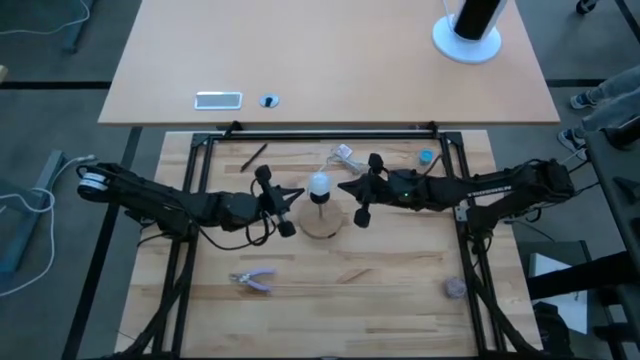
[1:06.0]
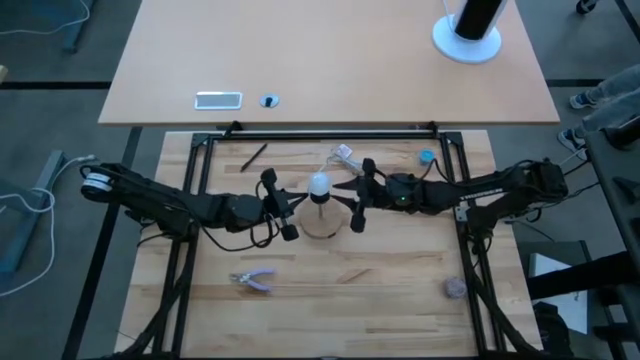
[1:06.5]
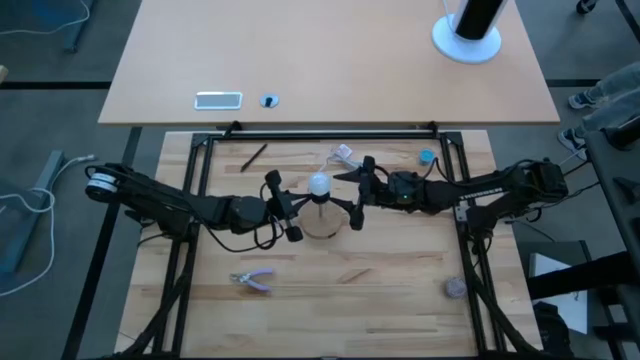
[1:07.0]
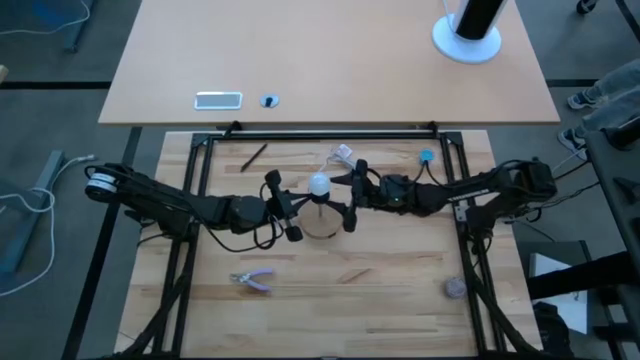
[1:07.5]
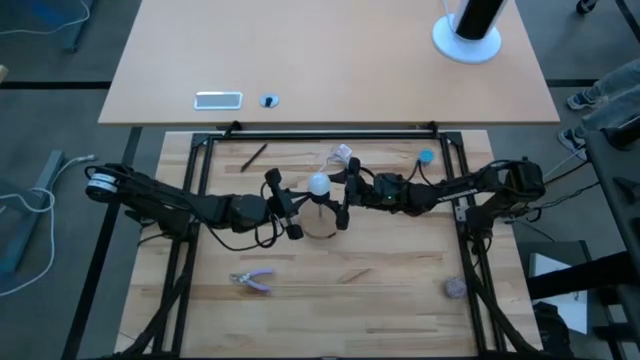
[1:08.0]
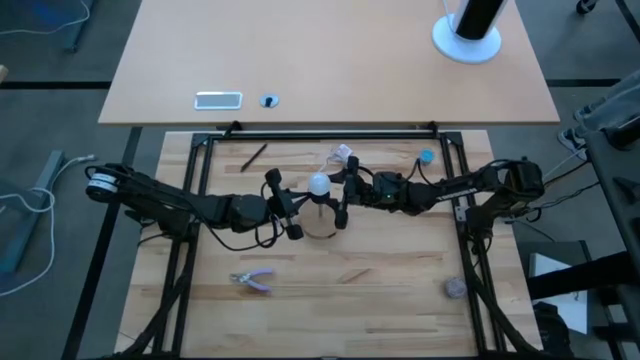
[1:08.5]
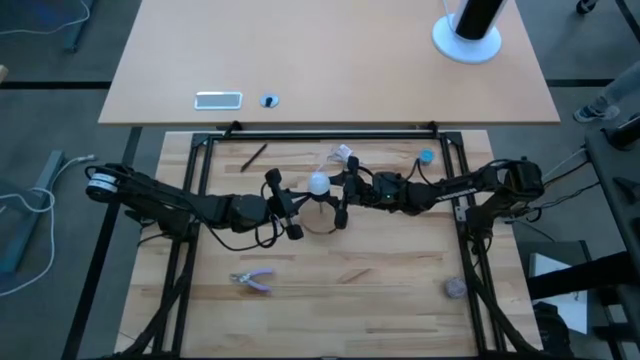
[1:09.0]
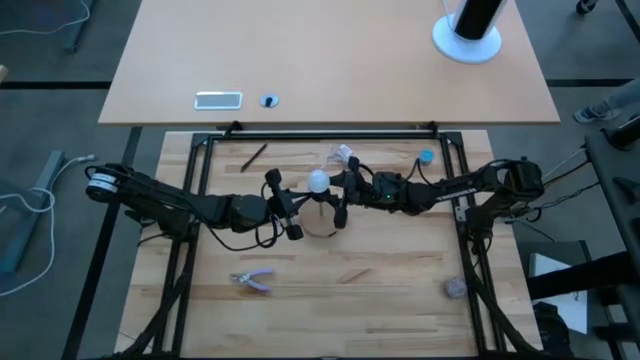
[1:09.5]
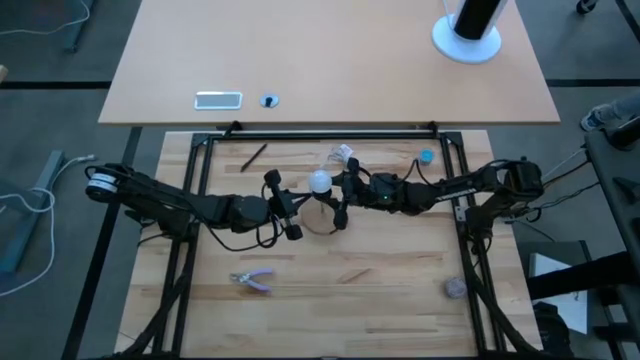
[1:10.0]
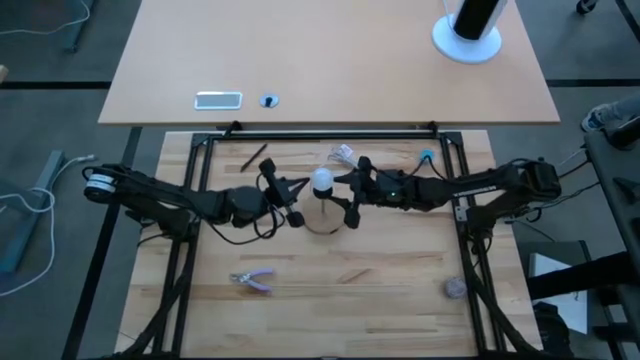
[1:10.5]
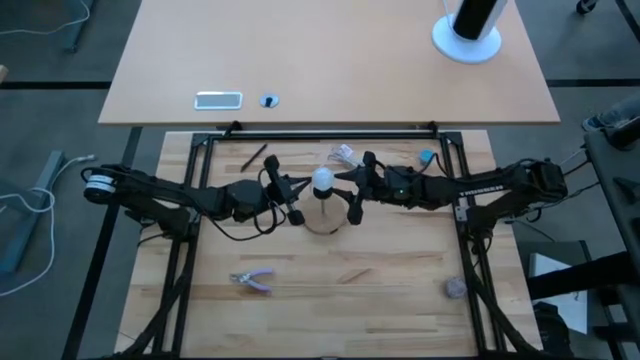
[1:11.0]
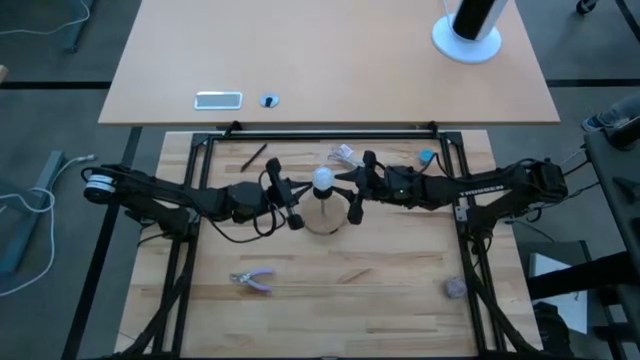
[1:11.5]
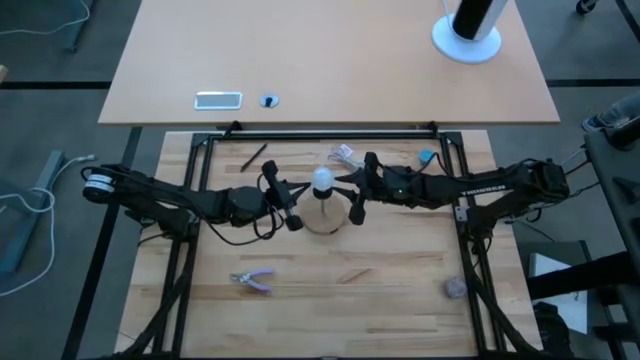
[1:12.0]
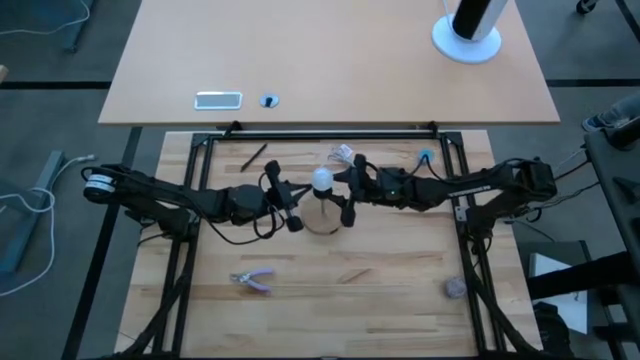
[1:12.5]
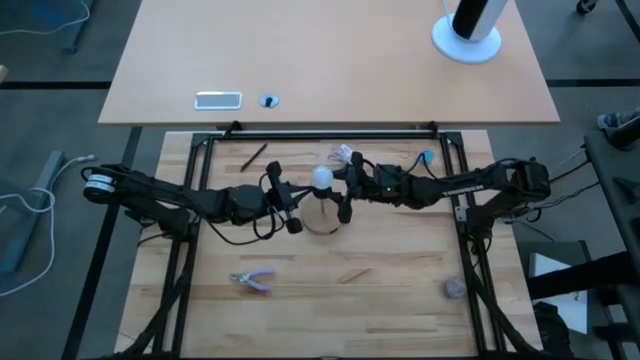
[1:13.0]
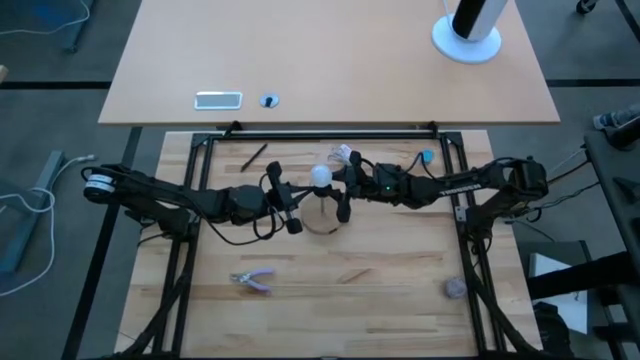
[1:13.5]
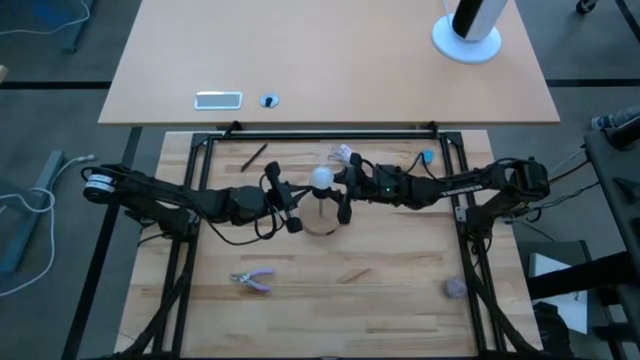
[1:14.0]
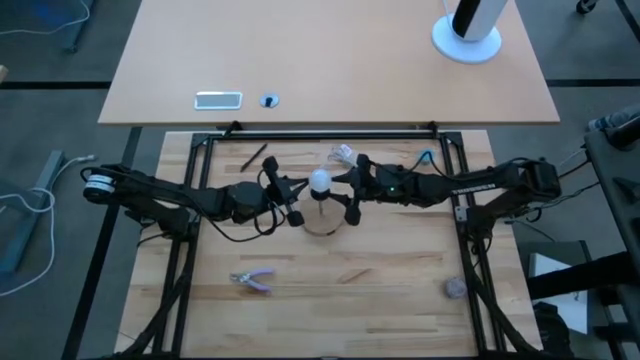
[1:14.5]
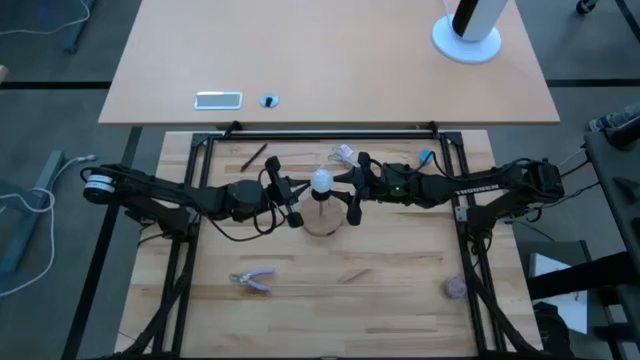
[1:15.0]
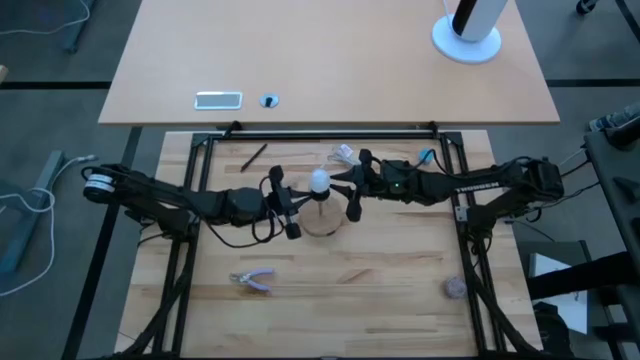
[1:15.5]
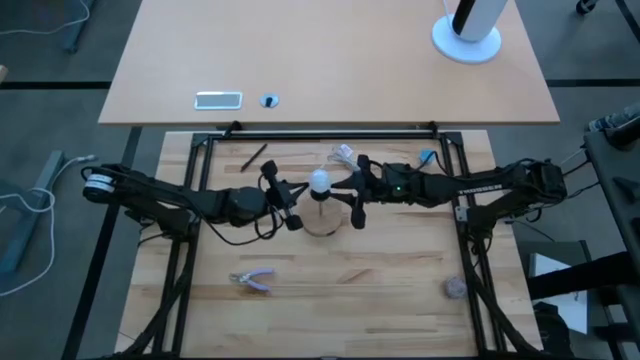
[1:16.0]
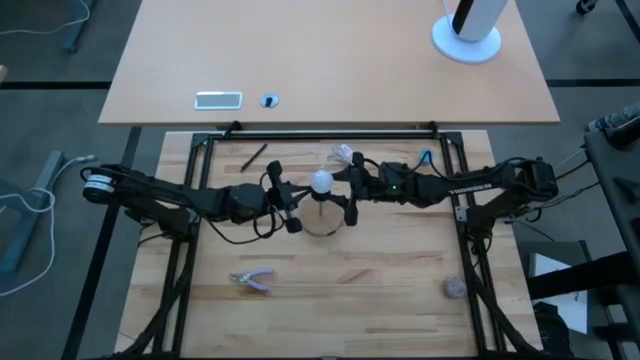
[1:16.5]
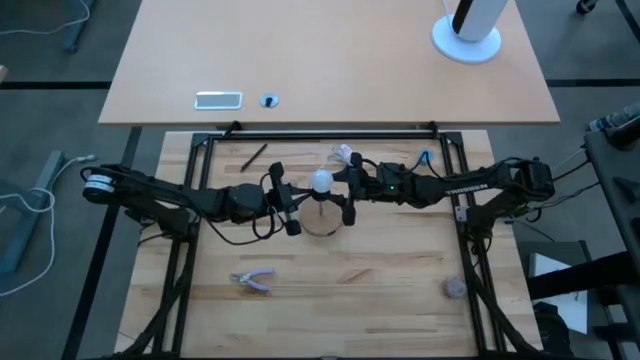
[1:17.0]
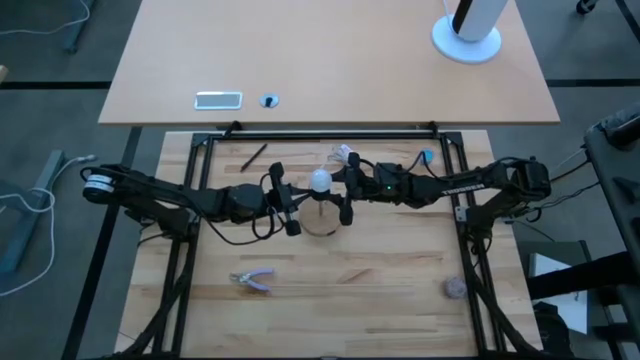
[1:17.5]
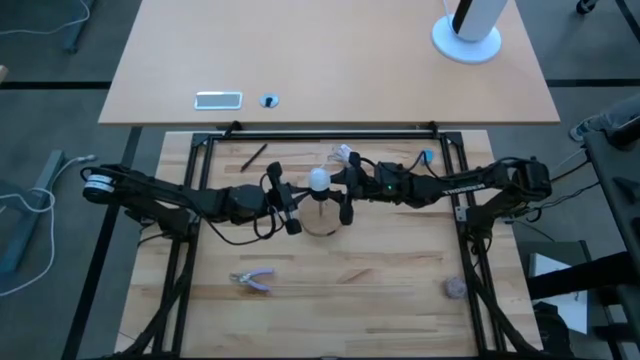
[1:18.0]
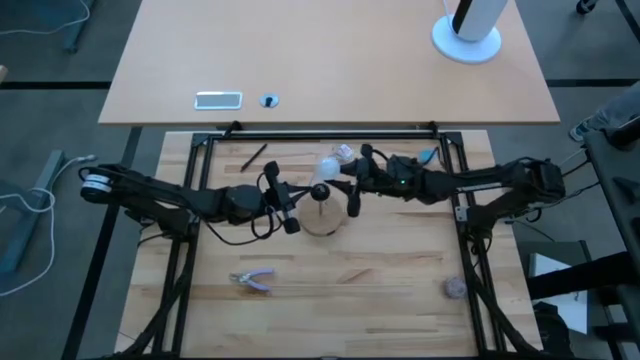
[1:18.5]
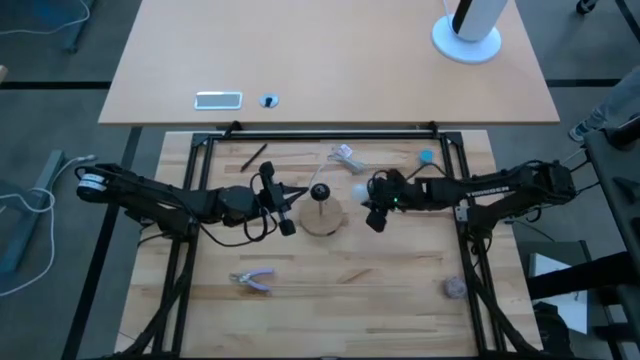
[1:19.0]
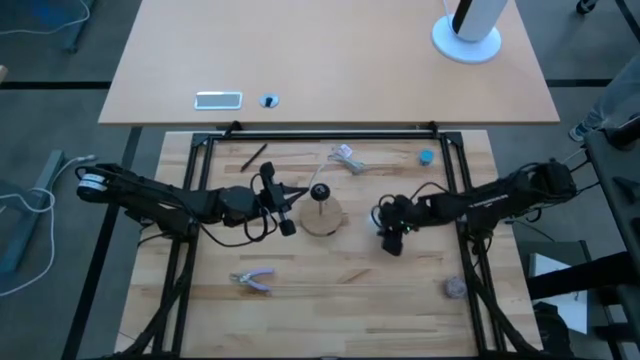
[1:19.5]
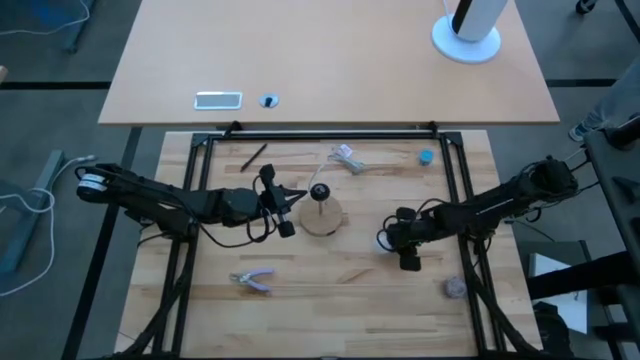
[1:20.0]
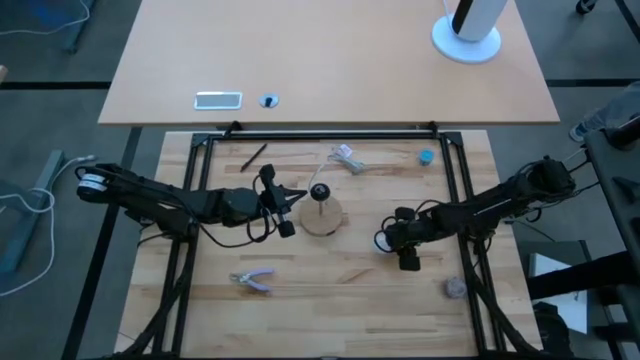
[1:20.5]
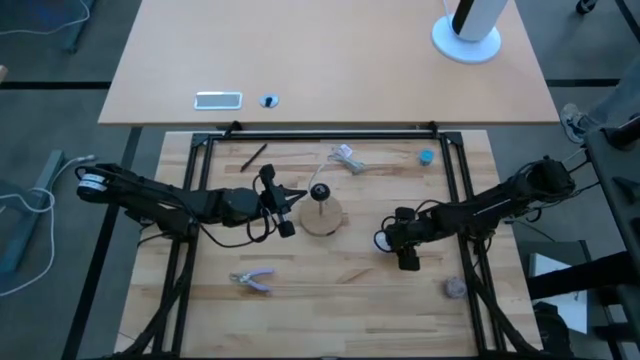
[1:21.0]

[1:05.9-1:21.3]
Task: Screw lightbulb
Remove the lightbulb from the lamp

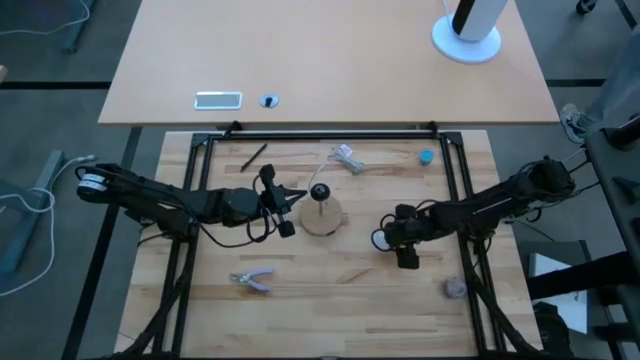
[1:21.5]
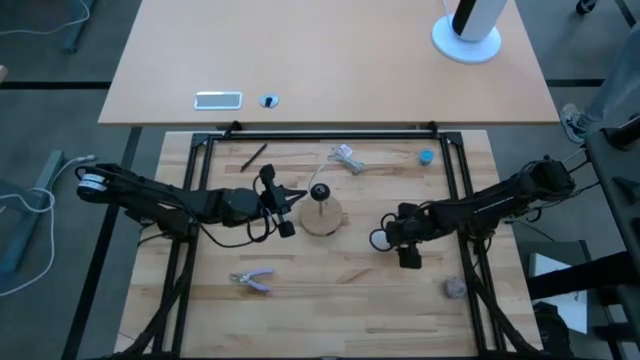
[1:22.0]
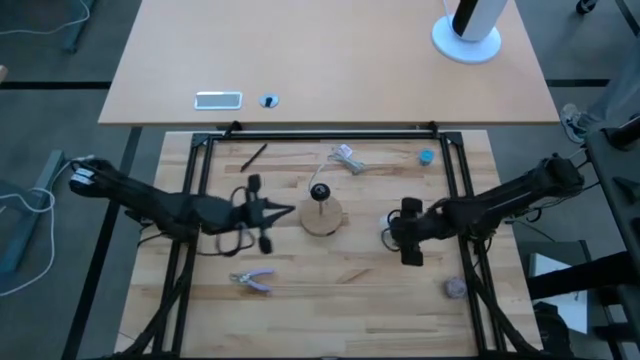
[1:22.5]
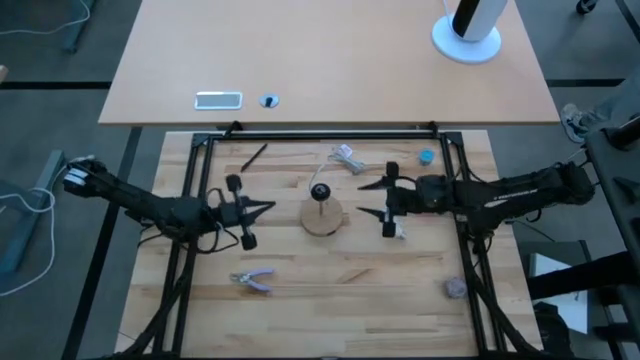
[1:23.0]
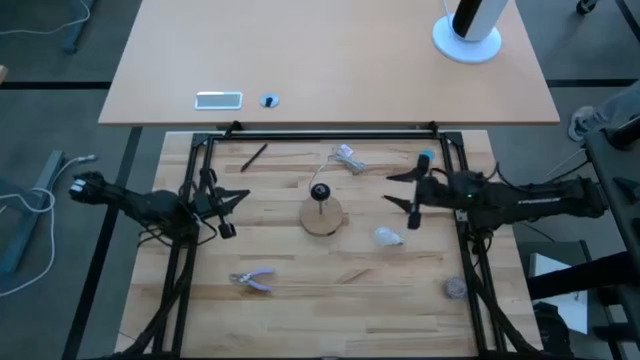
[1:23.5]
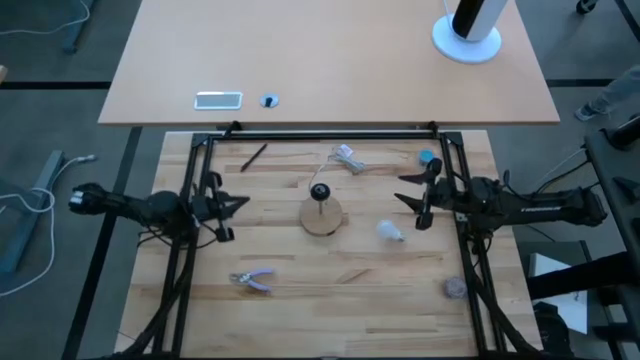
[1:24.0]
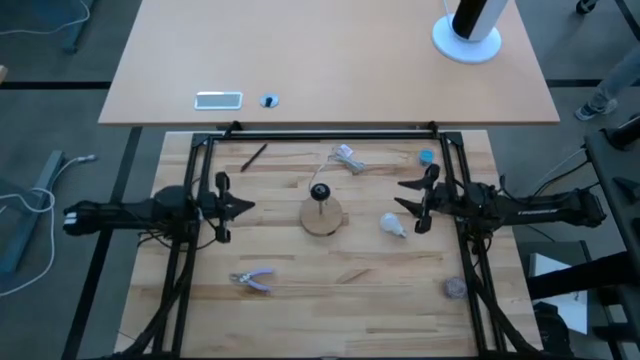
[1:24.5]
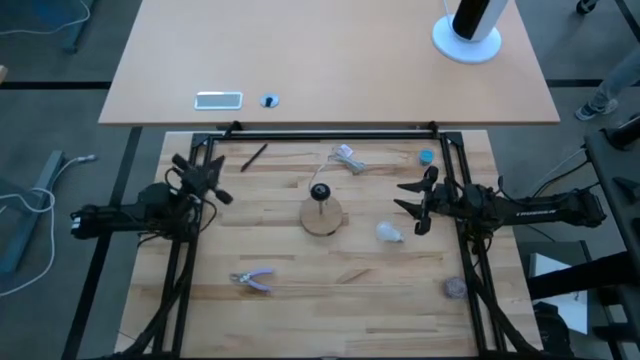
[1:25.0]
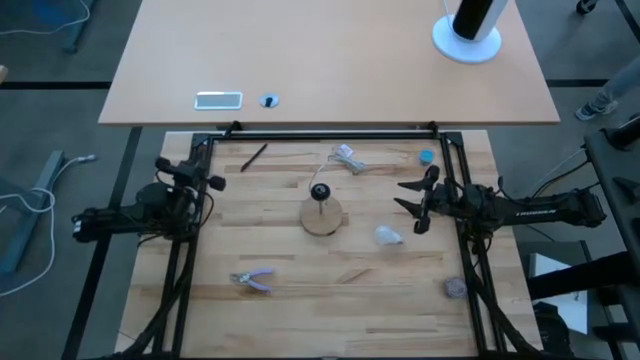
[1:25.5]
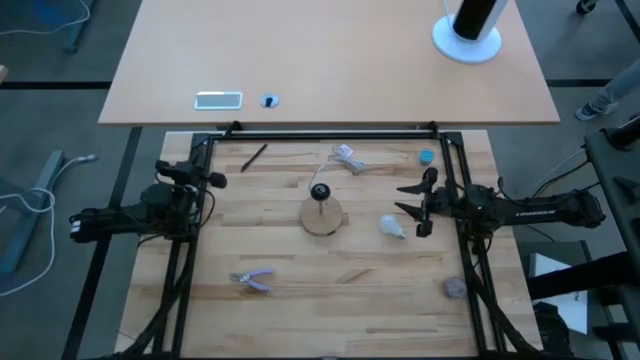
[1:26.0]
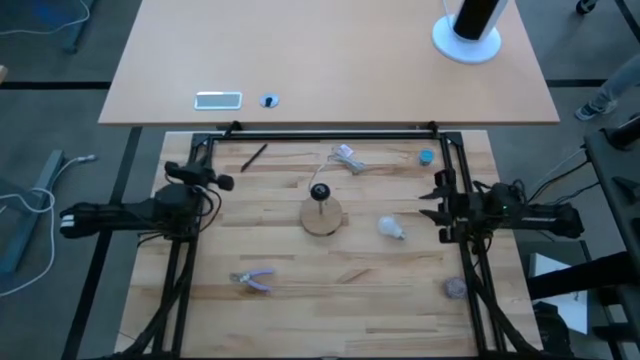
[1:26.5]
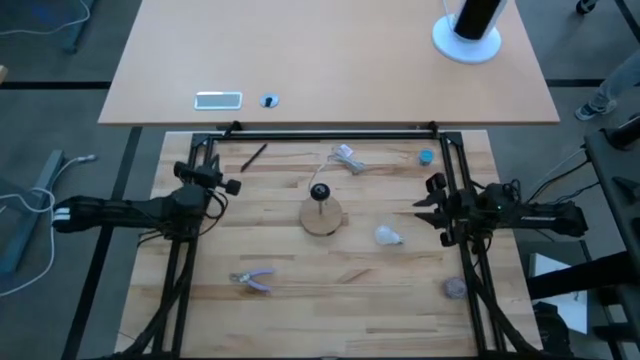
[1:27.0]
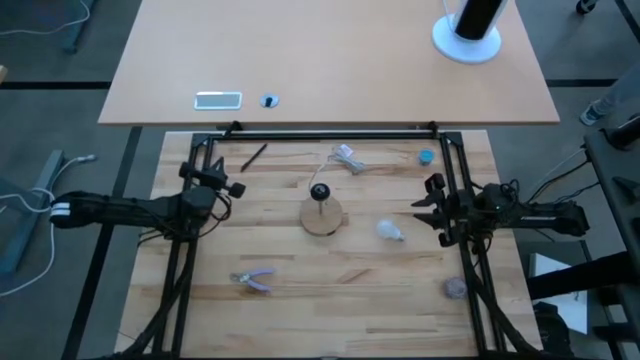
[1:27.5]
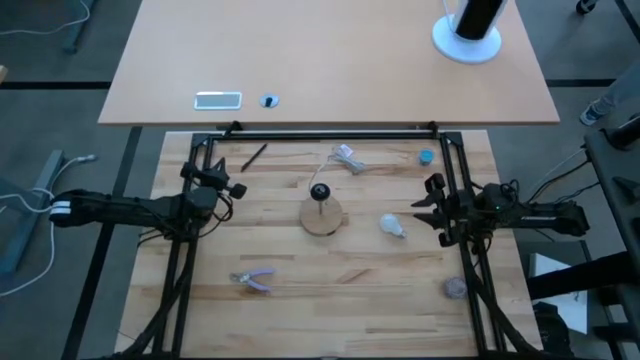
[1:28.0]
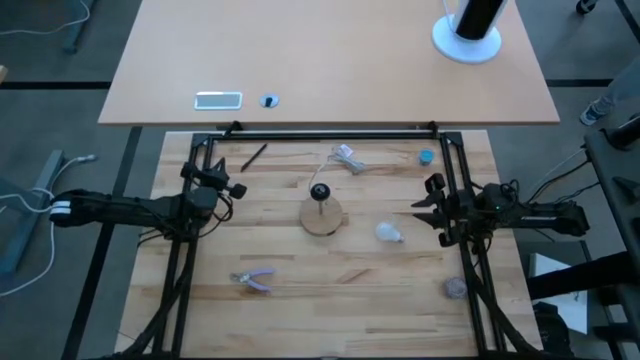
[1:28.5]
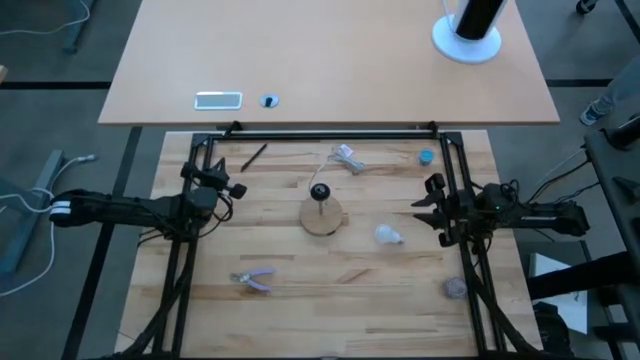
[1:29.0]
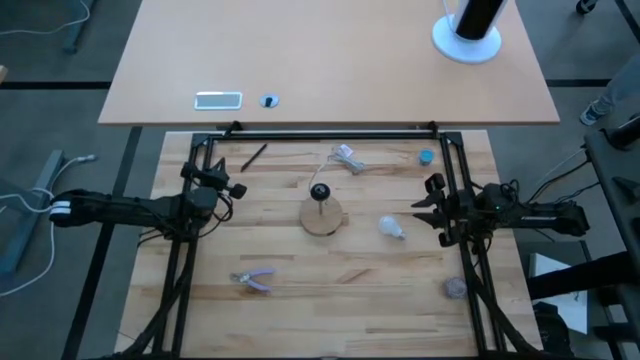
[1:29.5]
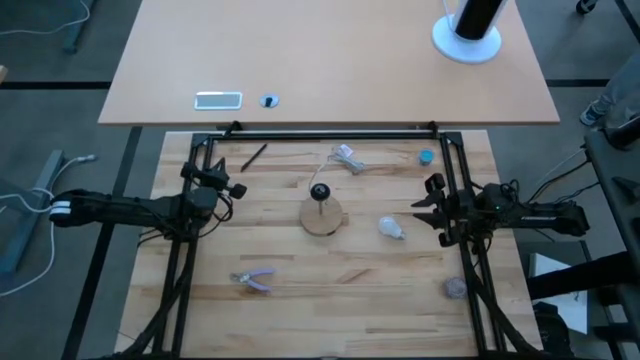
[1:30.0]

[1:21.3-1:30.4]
Return to Home Position
